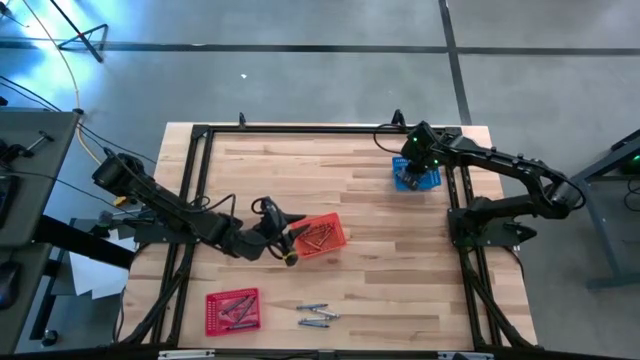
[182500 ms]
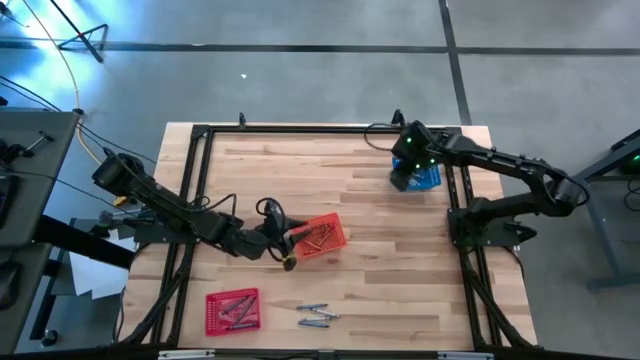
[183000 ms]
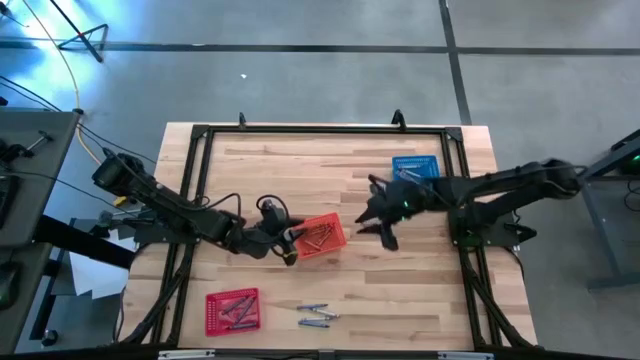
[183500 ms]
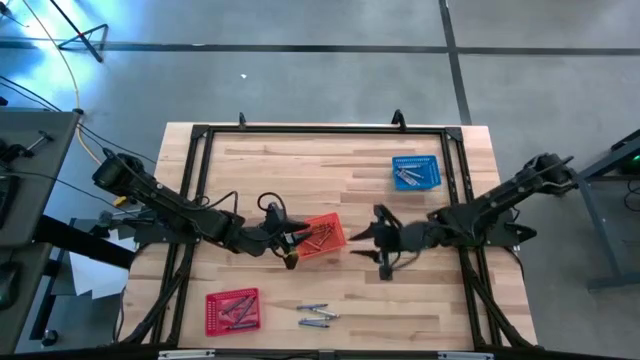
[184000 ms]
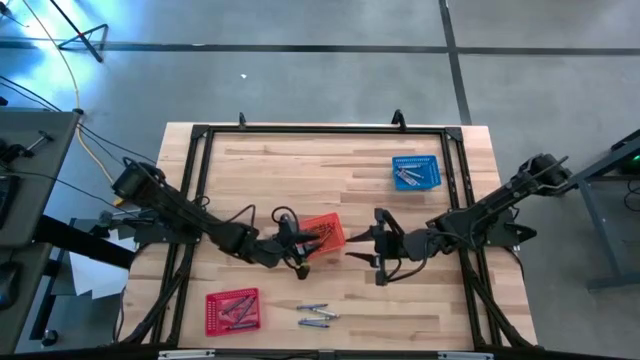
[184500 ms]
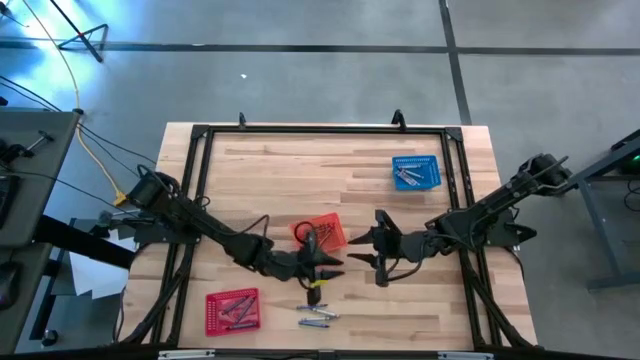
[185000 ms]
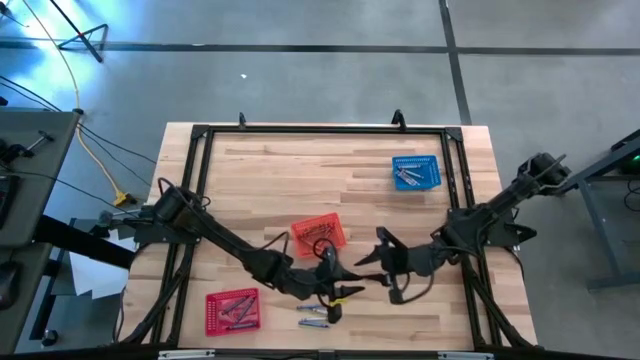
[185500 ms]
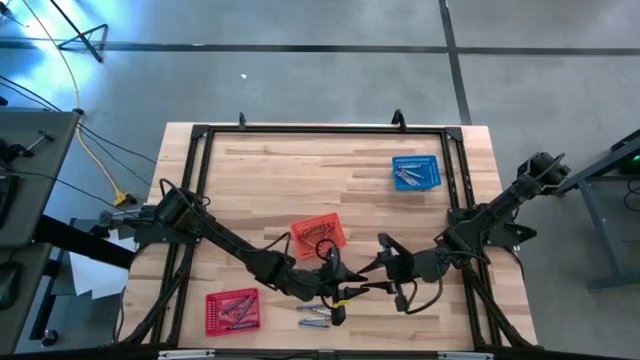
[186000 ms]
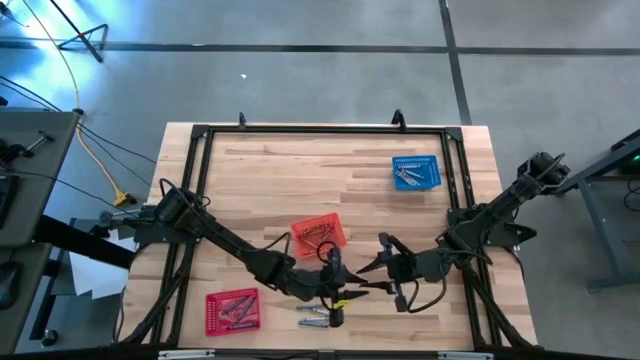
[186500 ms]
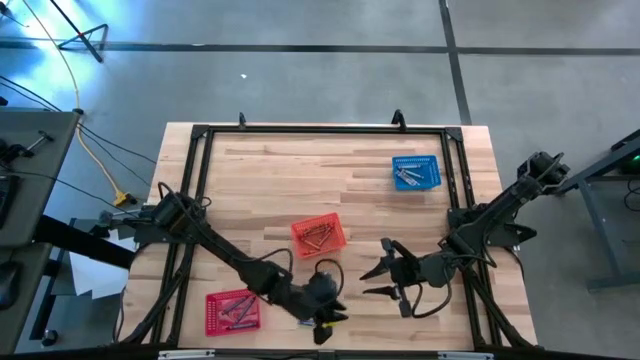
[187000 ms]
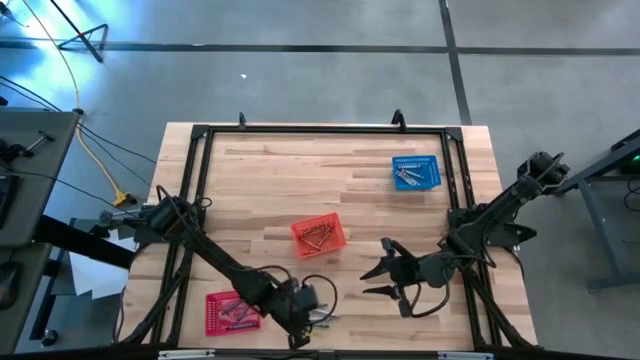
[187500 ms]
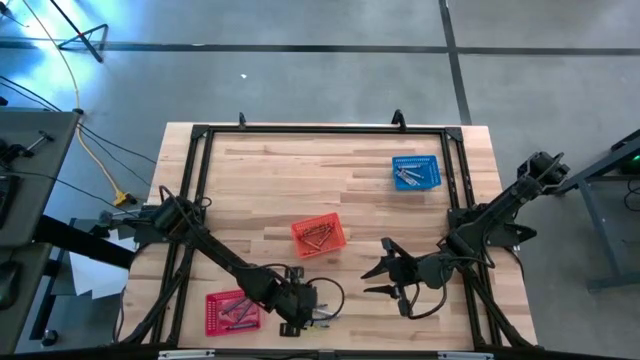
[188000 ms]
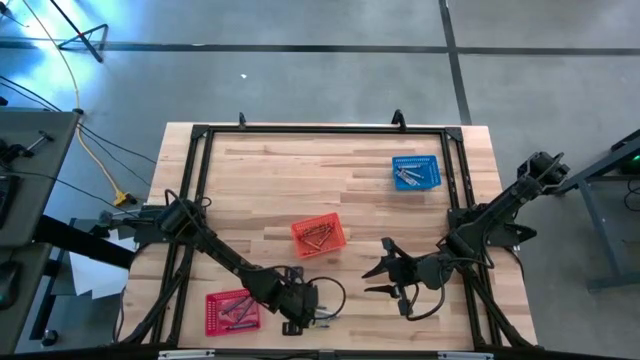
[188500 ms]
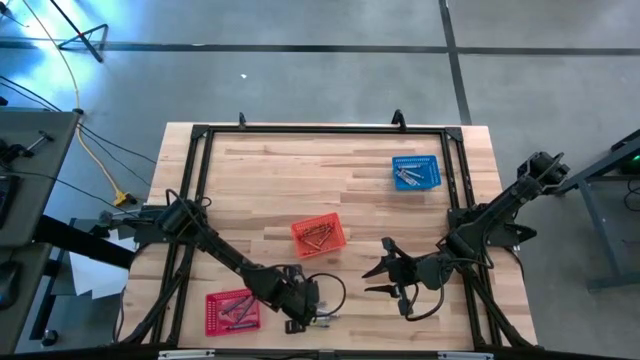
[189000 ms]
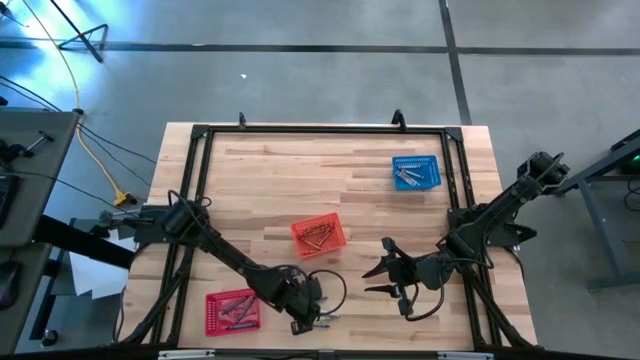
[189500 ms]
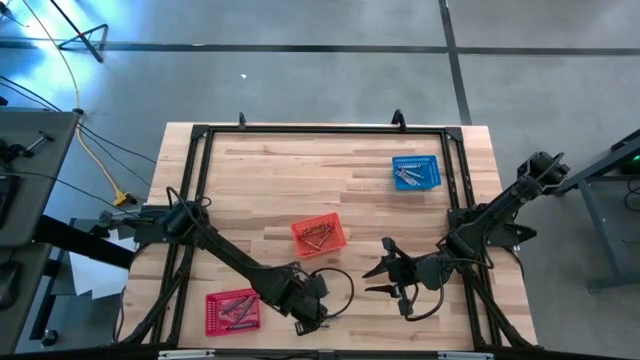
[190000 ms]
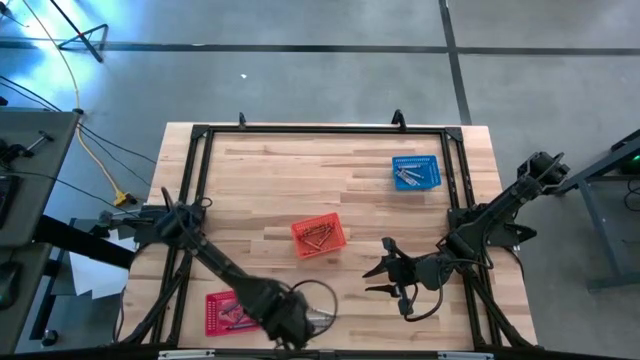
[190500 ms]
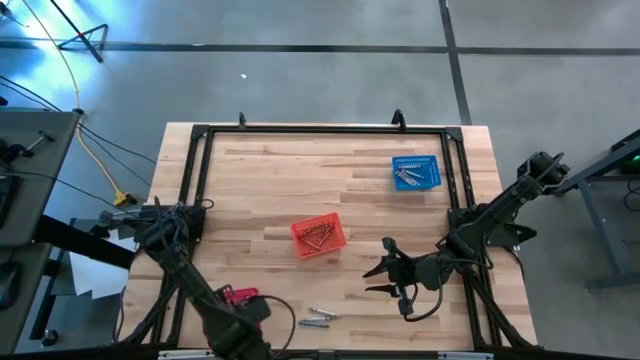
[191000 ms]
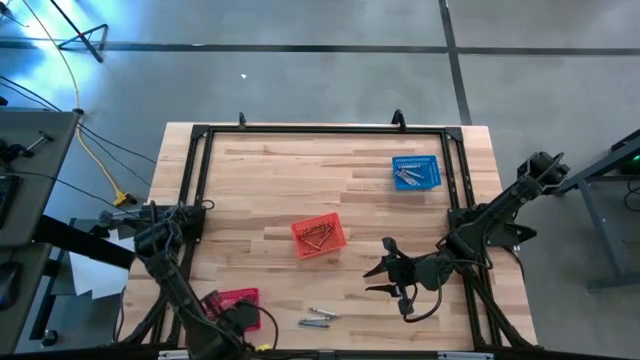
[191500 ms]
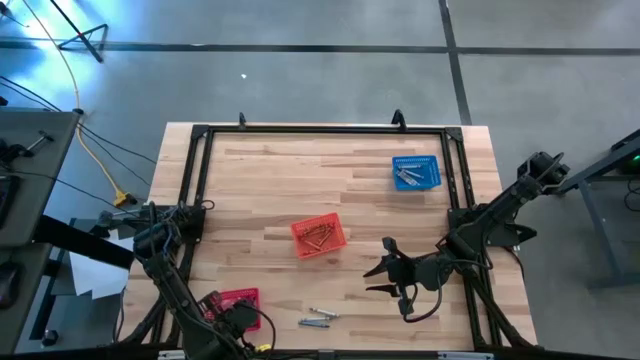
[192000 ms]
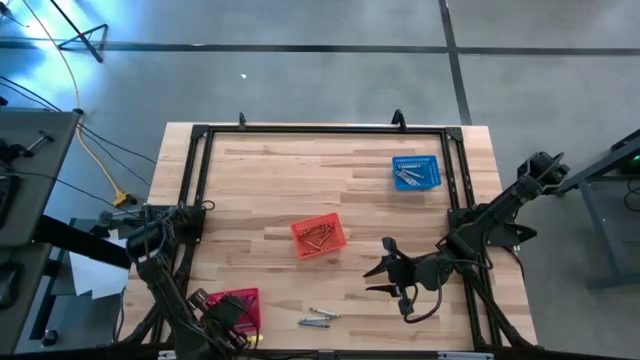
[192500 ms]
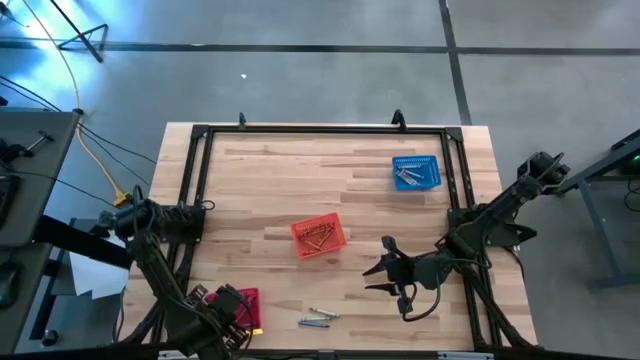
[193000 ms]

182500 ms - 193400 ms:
Task: Sort crayons
Put the top blue crayon into the red bin

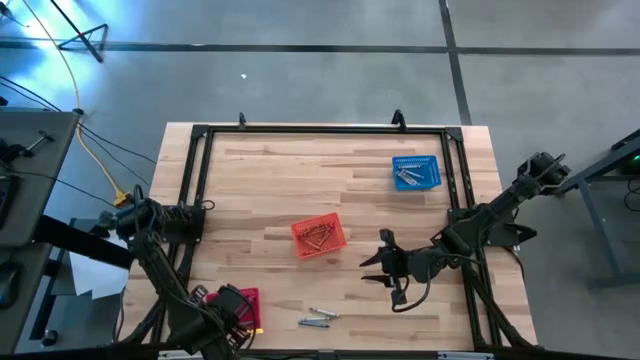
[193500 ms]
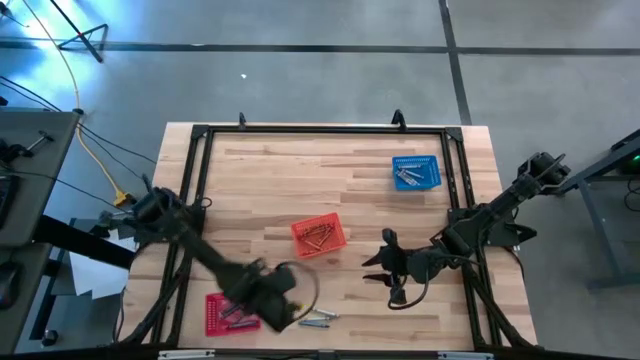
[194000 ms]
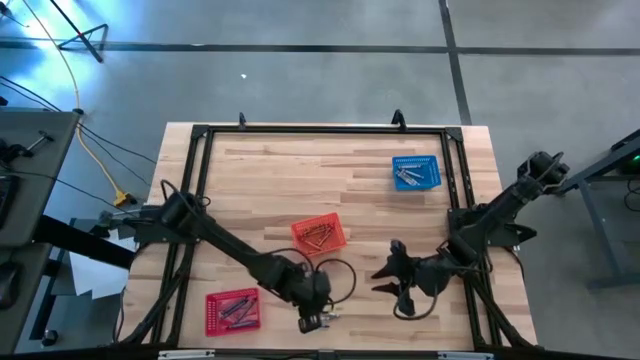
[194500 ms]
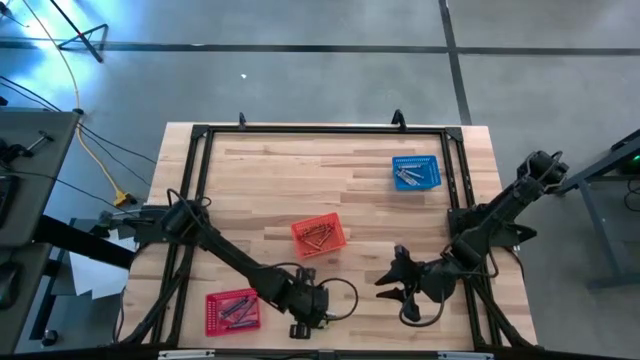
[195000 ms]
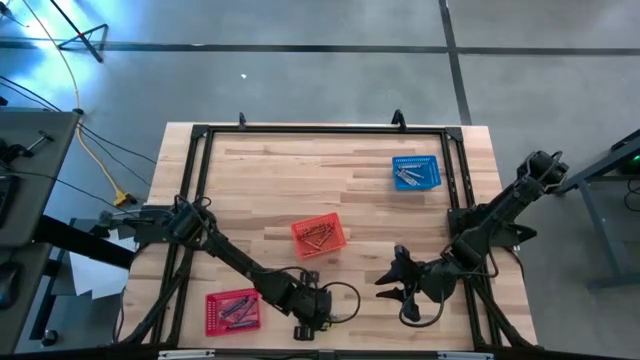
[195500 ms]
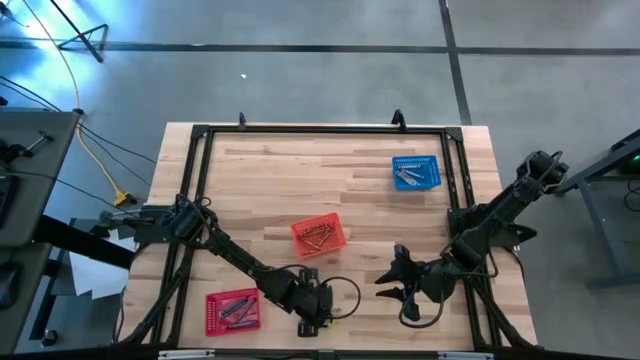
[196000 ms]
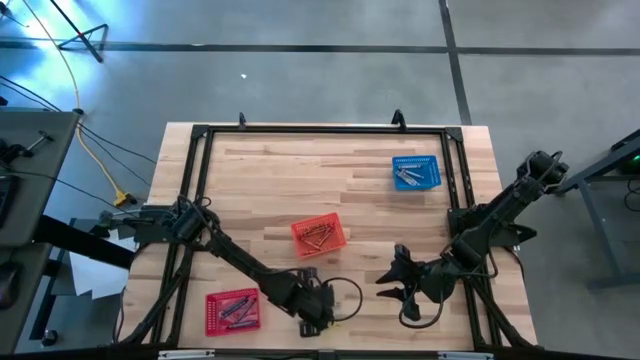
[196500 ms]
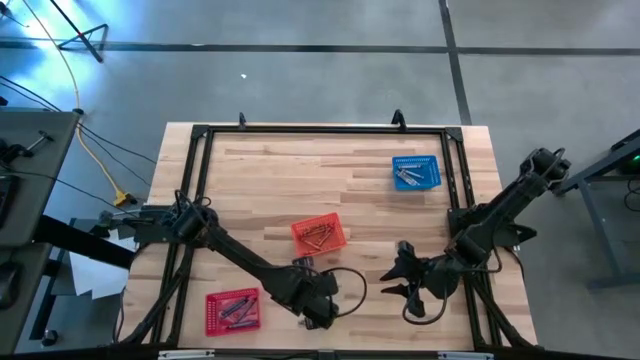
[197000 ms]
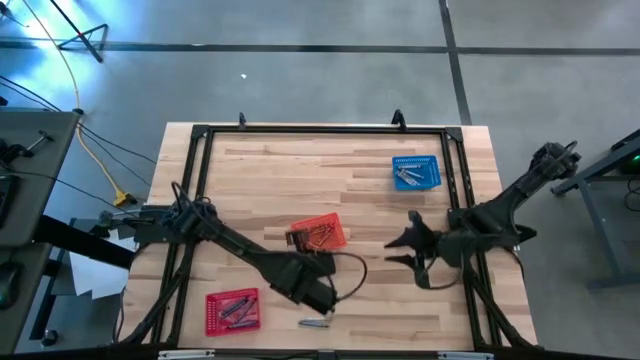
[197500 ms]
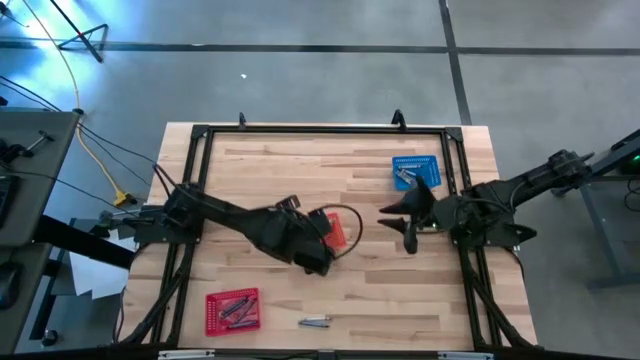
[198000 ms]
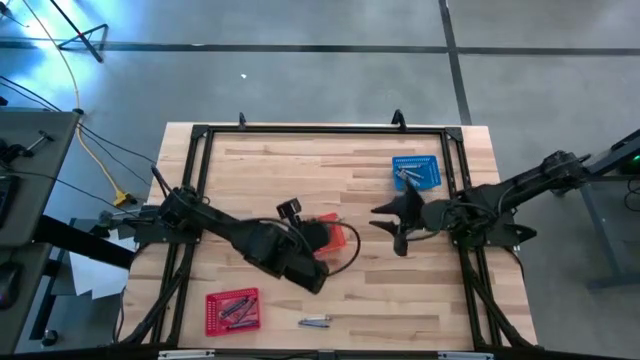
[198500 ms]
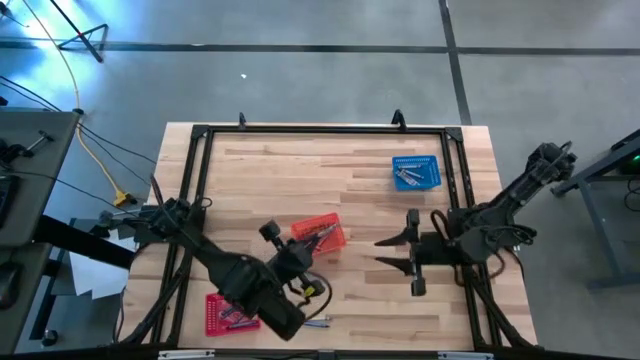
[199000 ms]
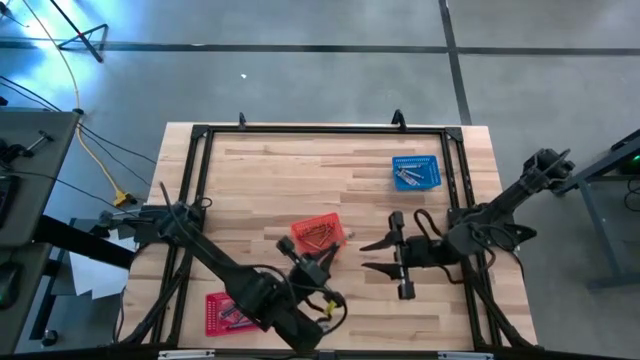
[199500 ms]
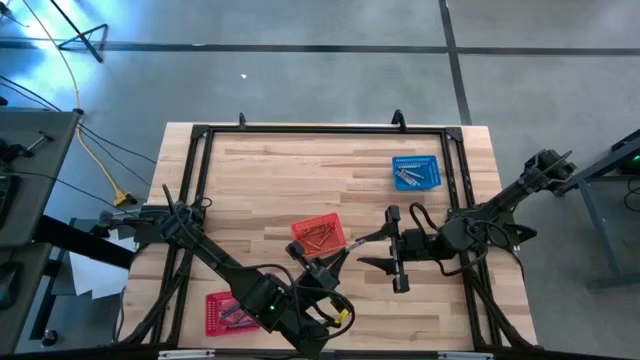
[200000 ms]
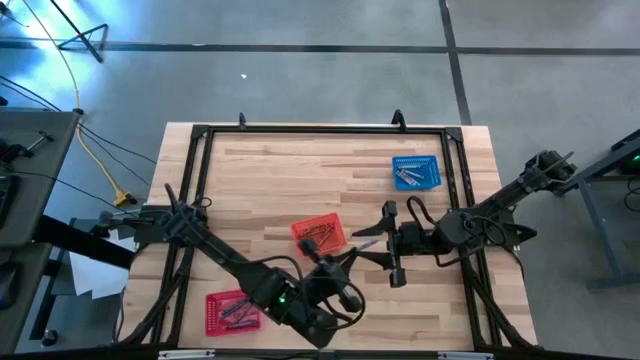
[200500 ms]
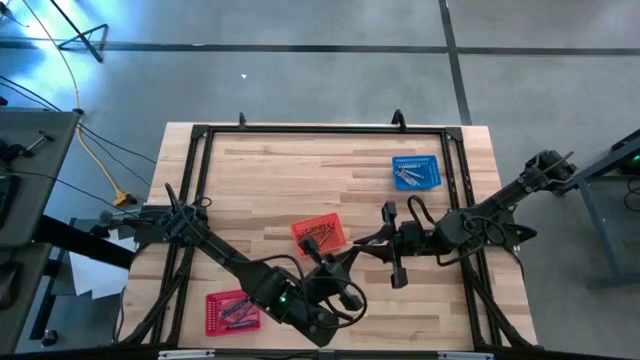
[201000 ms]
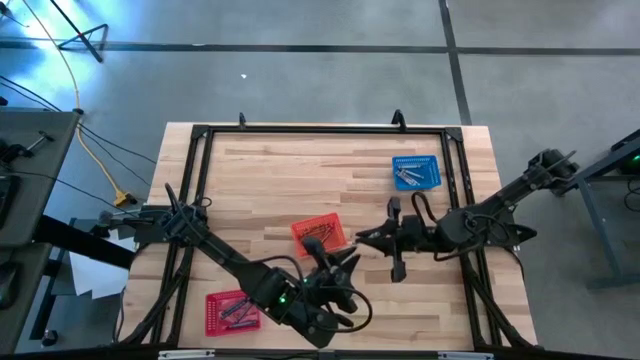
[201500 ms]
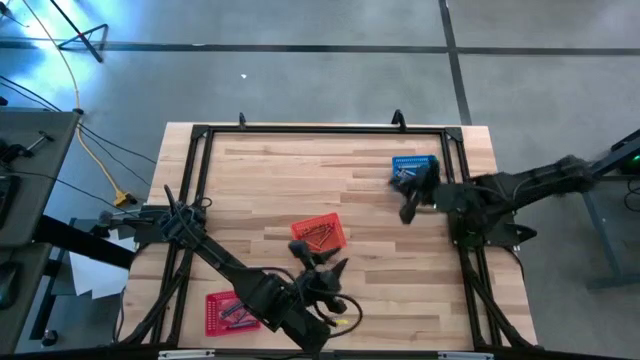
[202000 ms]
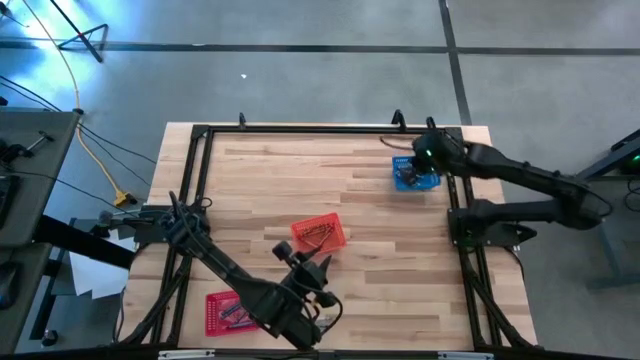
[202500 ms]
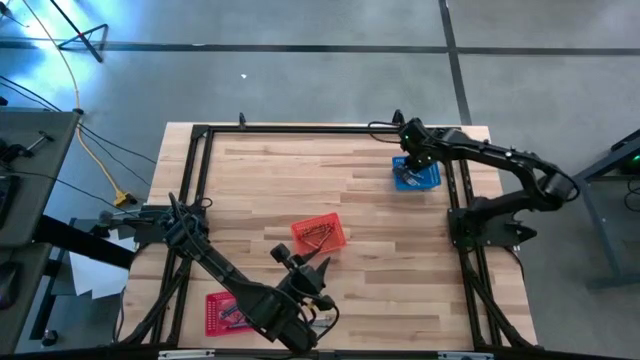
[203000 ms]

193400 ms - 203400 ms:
Put the top gray crayon into the blue bin

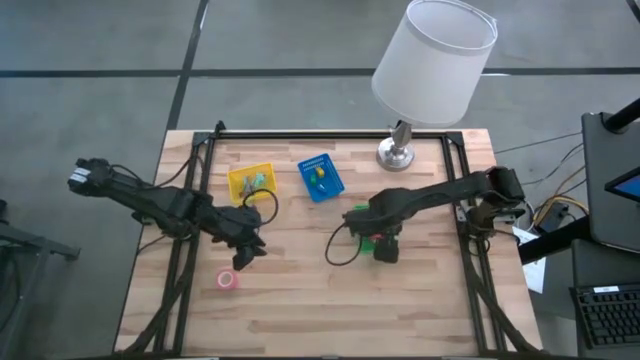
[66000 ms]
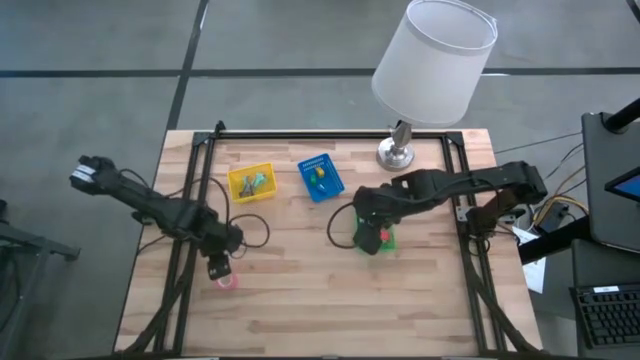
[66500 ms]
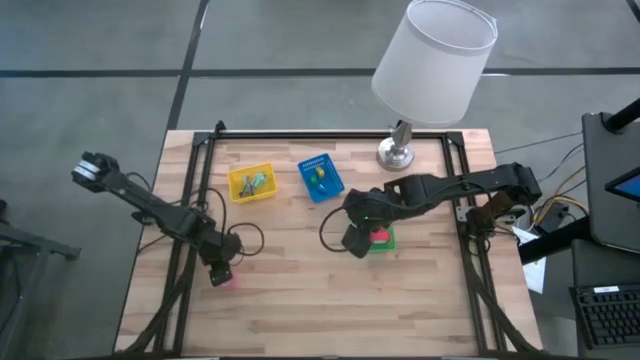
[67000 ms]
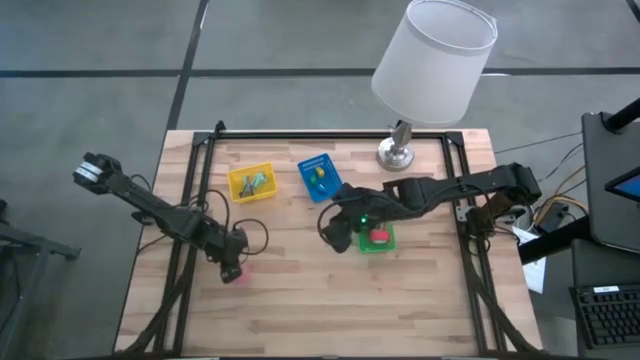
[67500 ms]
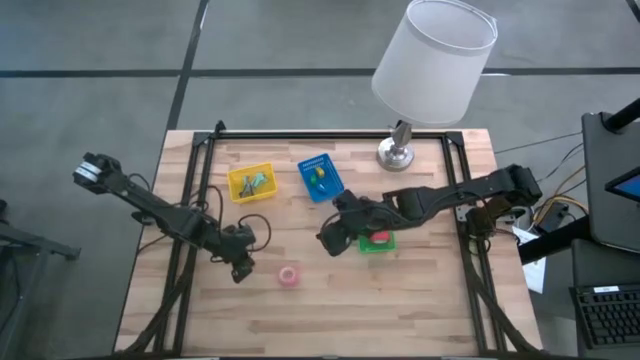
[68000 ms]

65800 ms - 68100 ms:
Task: Pick and place Stapler, Stapler remover, tape
Put the pink tape into the green bin
